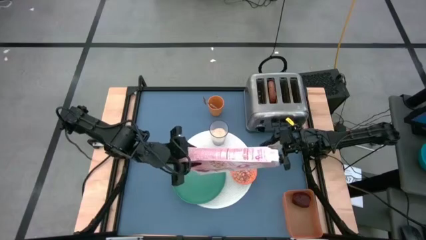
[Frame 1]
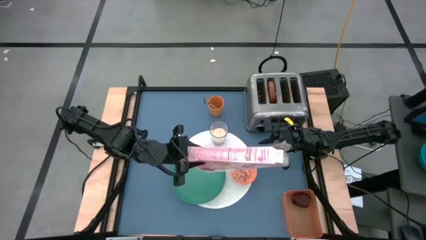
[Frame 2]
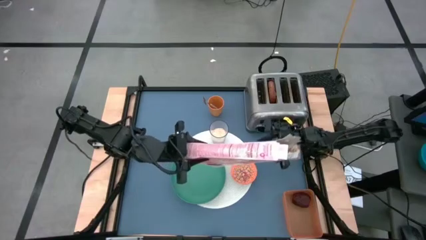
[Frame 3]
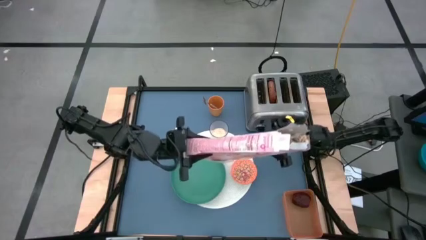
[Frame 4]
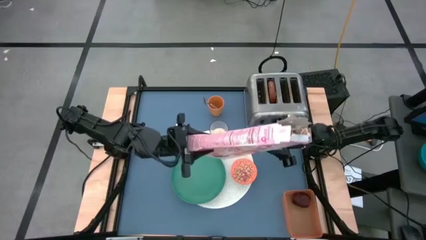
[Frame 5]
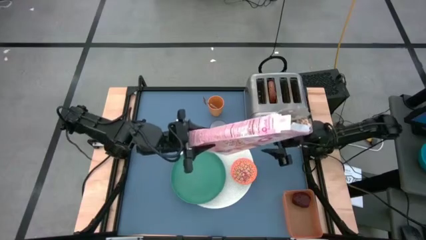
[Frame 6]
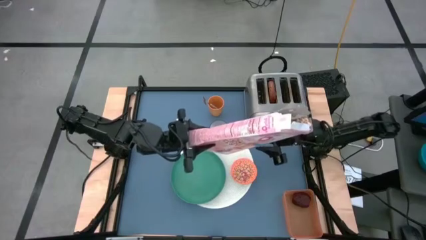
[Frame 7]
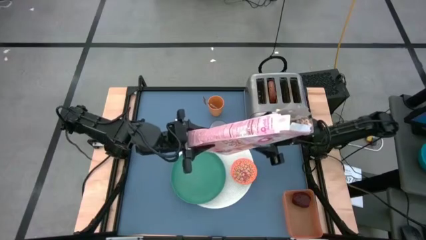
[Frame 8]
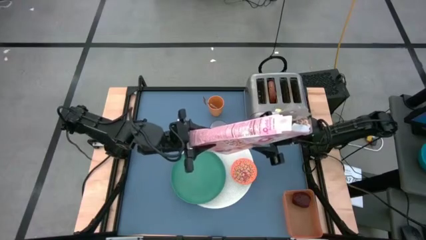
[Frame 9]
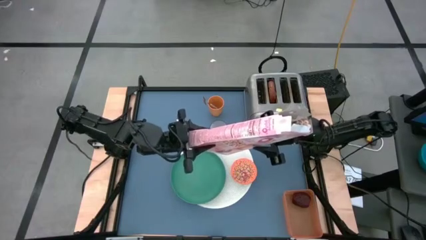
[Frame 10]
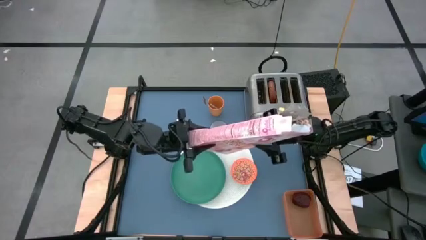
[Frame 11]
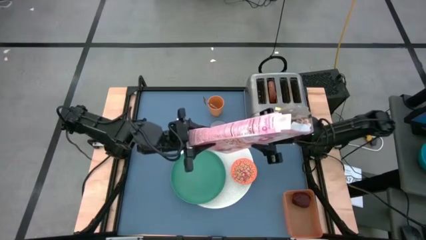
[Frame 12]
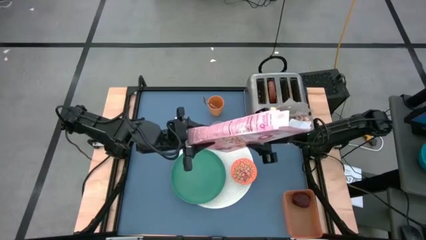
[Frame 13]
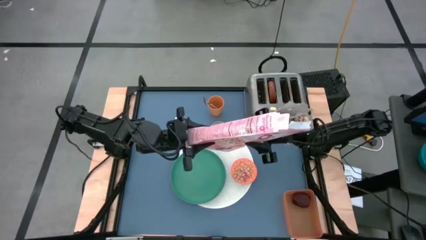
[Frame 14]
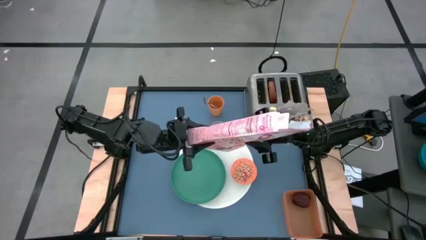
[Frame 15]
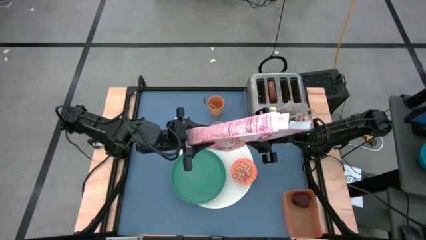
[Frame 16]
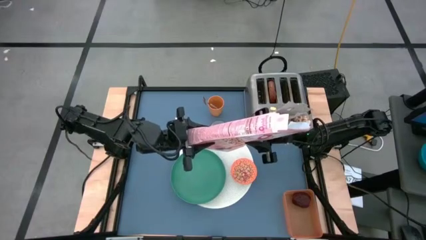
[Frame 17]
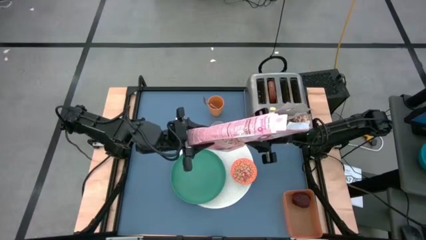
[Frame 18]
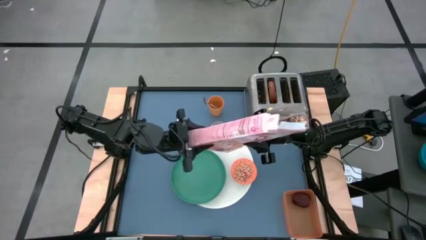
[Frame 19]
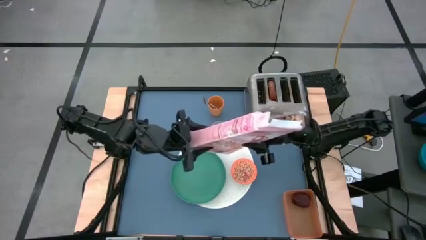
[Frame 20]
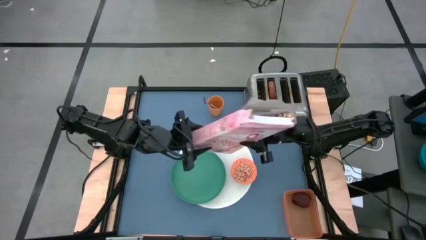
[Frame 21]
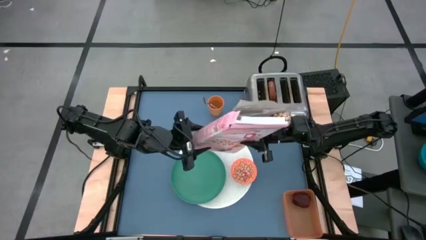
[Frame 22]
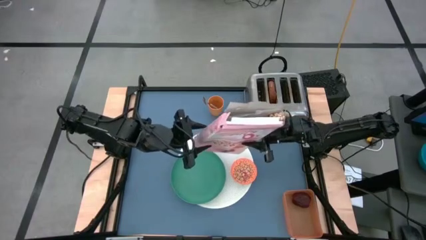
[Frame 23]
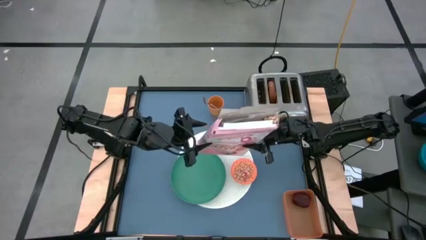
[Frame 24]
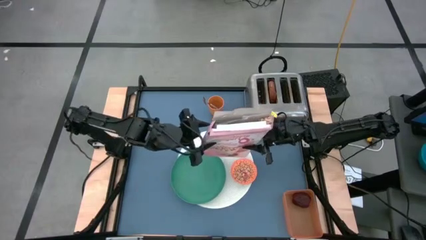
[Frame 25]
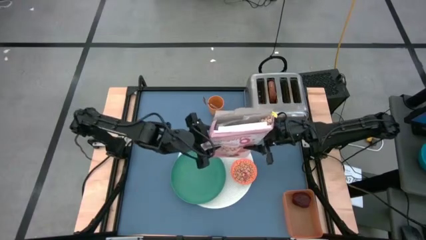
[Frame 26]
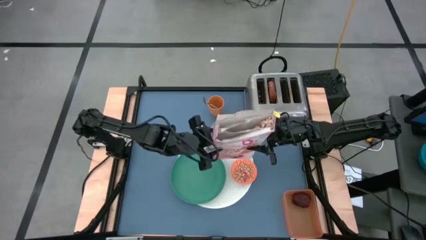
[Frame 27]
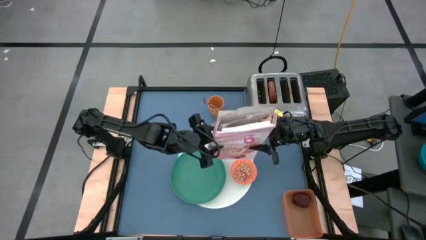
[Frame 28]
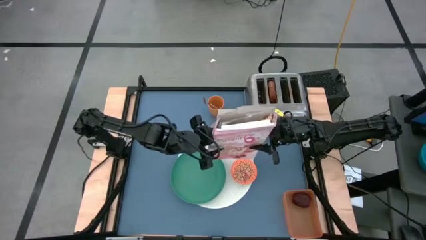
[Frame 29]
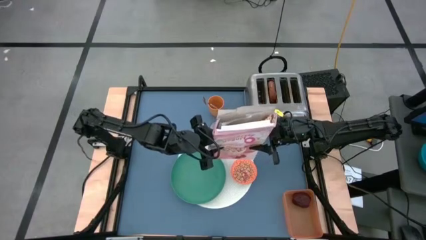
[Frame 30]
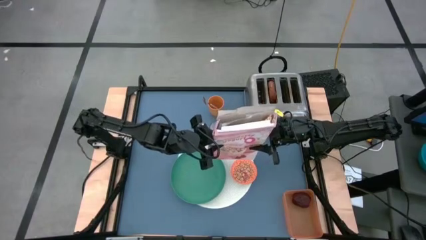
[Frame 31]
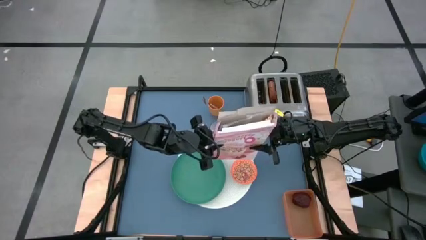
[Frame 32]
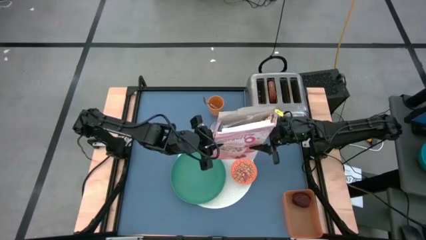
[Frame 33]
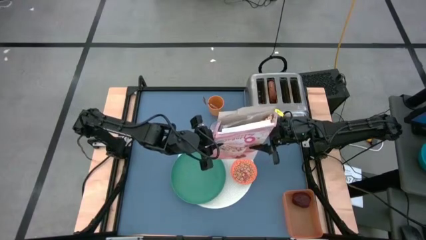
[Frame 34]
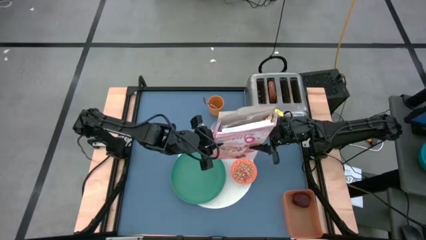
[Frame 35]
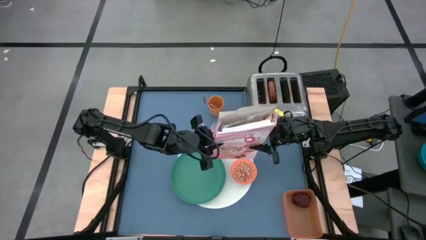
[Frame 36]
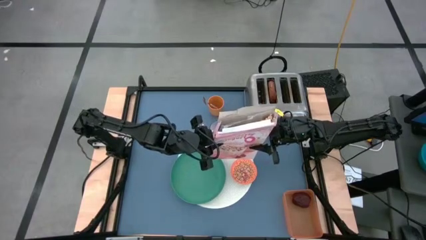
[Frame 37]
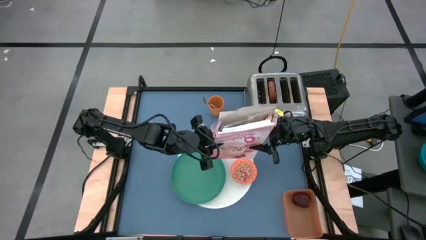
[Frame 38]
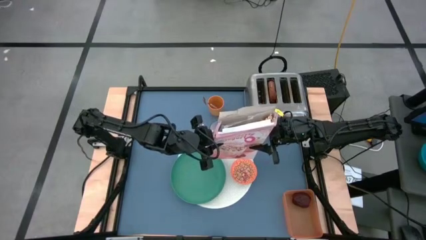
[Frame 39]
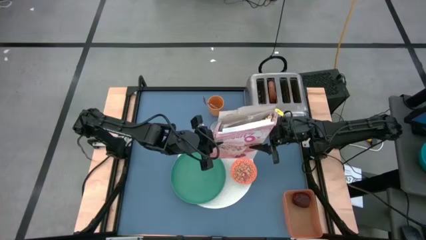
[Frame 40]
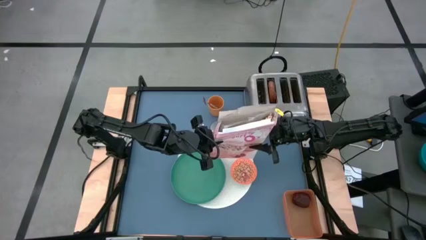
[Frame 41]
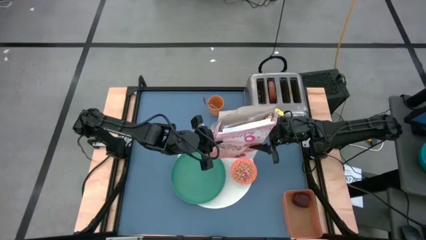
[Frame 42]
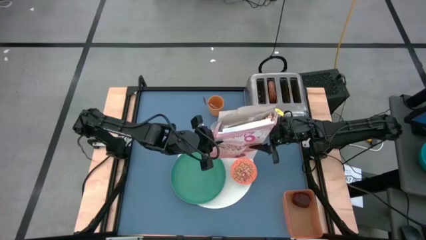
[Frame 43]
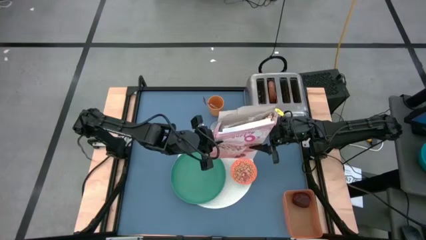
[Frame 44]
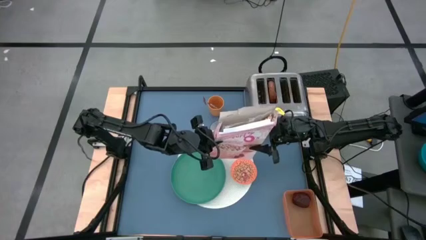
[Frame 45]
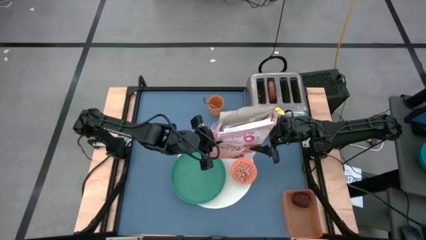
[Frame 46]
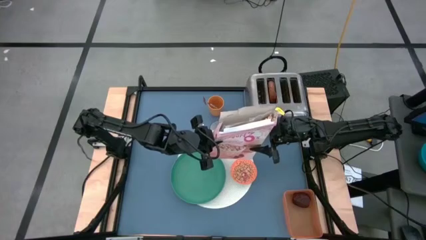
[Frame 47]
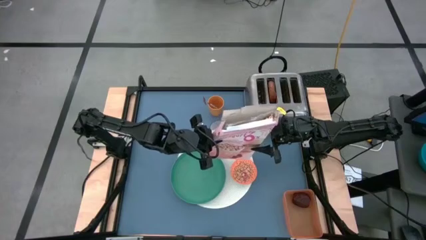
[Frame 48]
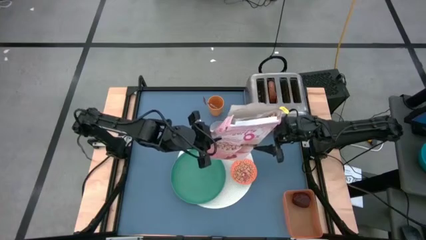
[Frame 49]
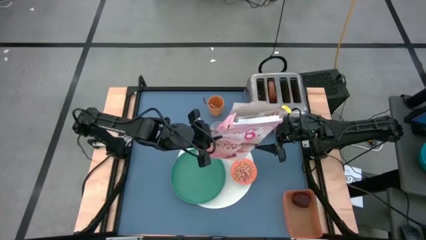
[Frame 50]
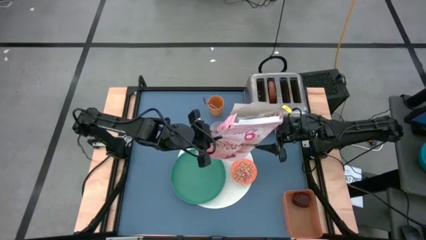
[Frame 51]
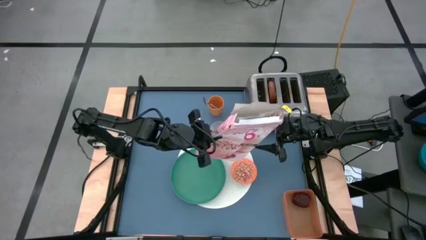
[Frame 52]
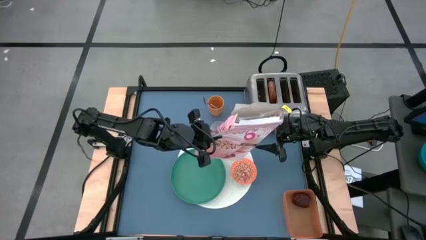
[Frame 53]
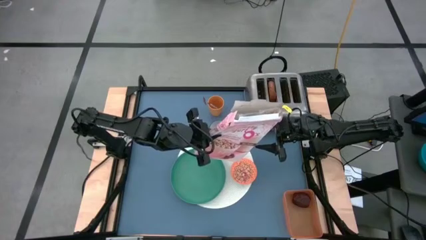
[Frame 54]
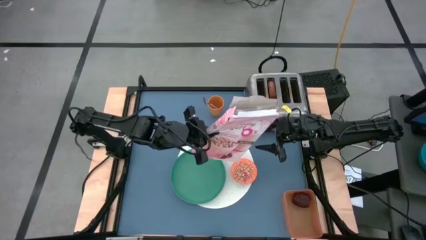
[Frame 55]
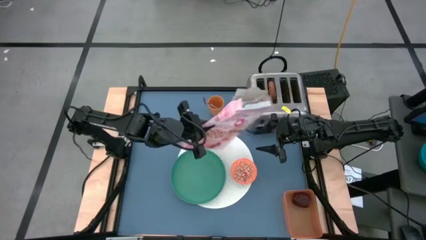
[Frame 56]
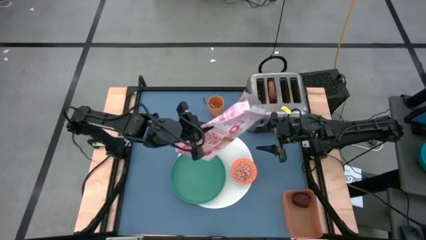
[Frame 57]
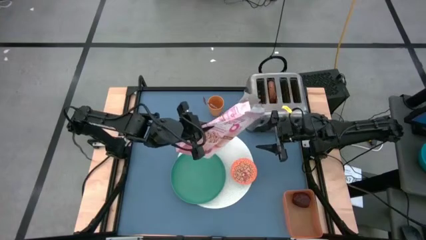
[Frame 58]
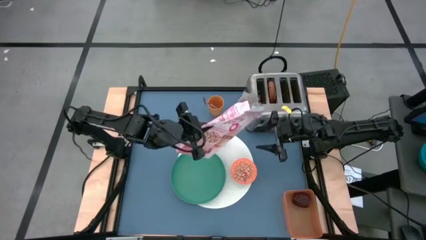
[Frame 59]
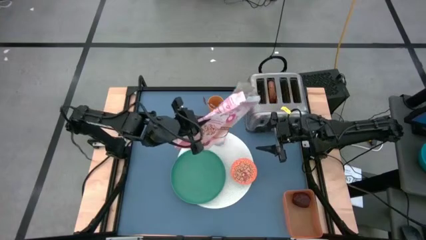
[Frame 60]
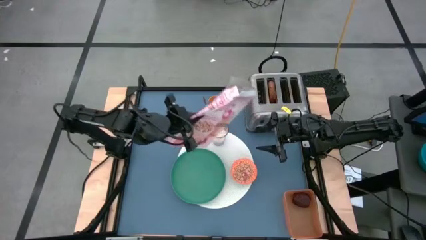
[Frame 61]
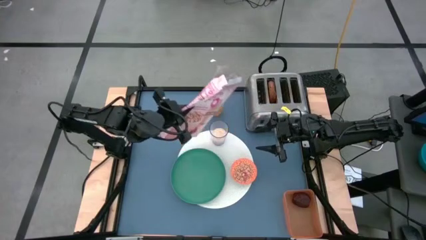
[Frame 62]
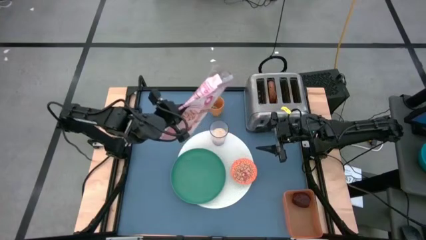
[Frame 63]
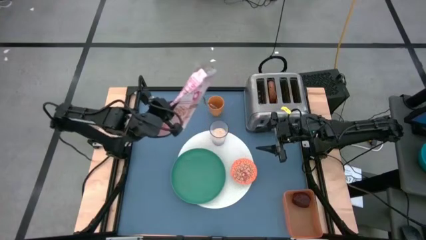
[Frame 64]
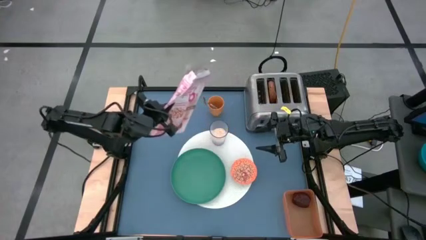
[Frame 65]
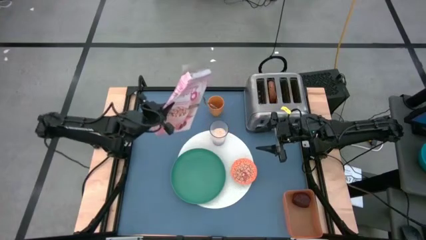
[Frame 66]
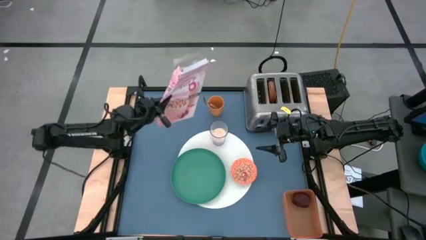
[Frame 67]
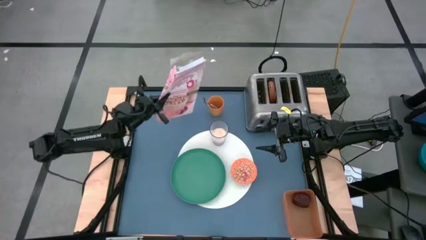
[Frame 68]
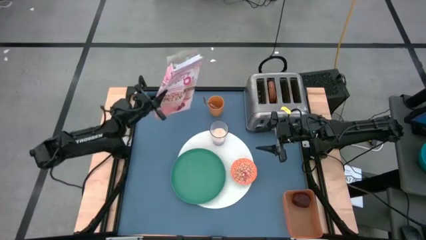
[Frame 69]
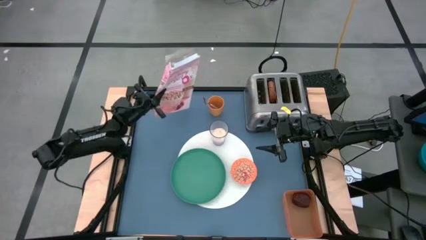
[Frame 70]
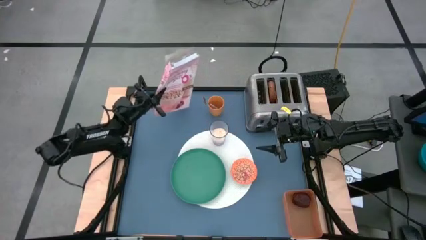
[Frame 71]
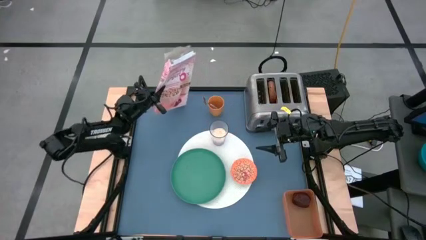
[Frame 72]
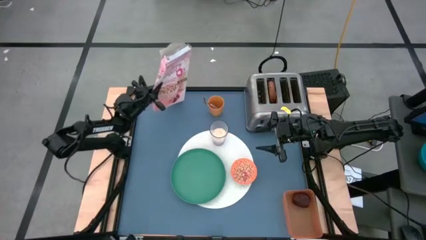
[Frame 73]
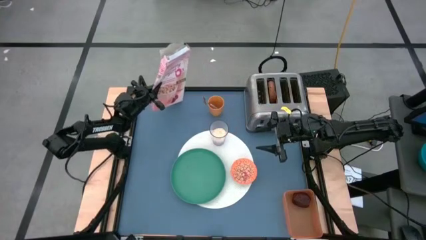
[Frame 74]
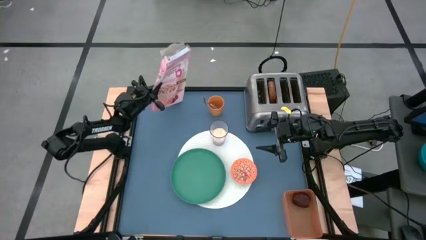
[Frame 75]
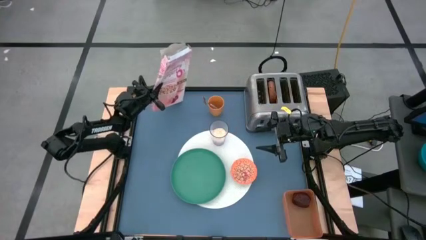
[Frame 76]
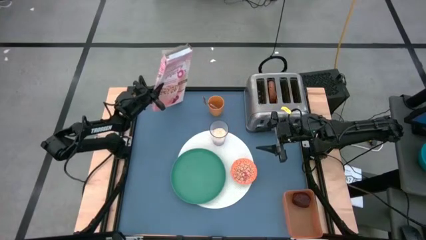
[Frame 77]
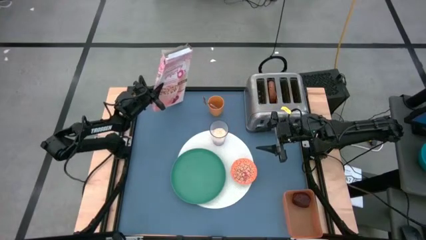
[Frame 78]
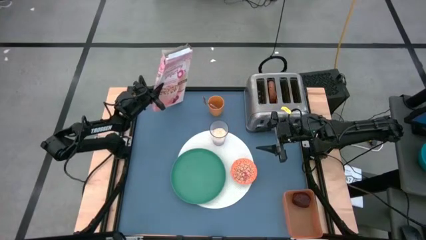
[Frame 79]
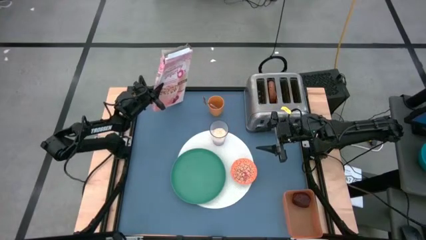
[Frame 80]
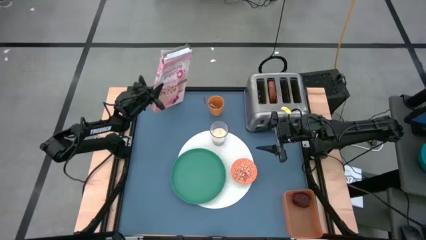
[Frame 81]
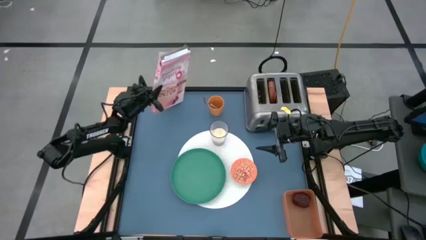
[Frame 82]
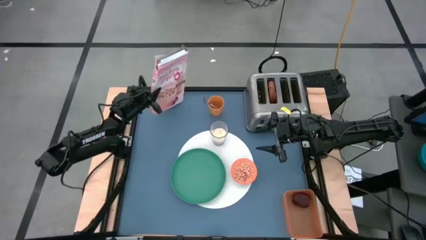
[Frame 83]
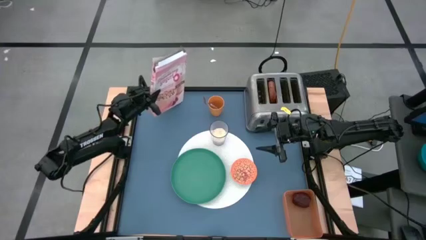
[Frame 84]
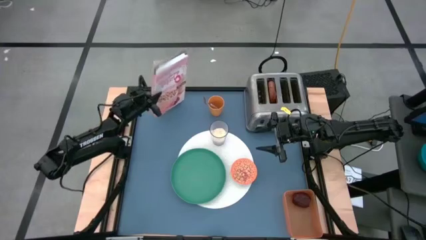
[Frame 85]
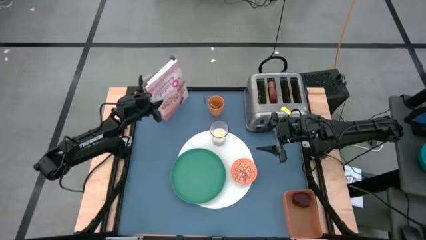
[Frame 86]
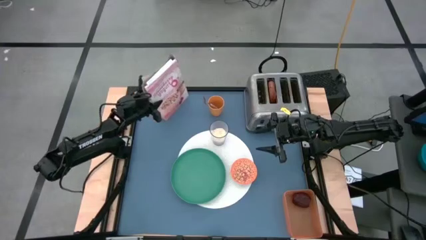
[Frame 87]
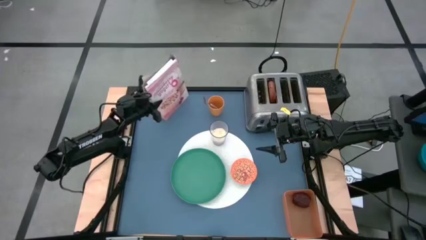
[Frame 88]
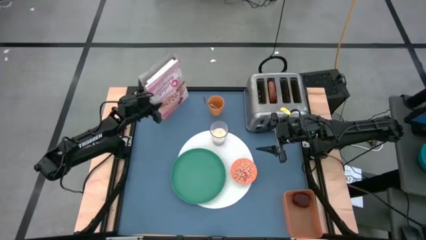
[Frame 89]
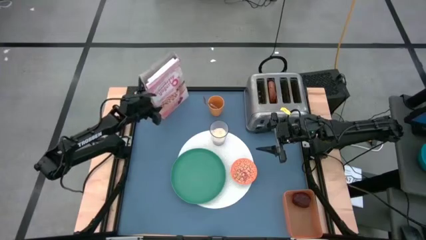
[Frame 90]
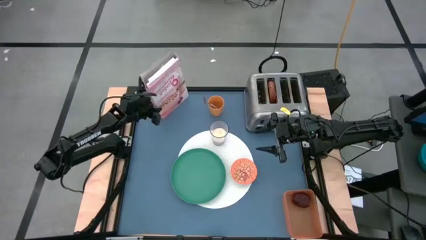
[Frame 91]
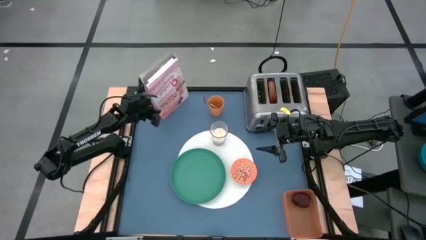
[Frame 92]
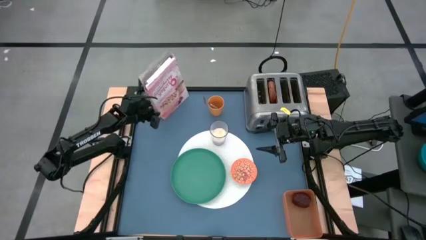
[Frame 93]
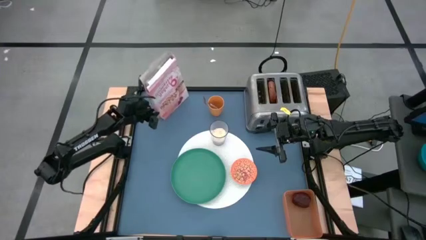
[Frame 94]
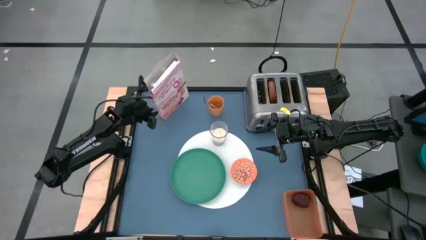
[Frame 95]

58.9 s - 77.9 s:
Task: Arrange a breakfast setting
Pour the cereal from the cereal box into the orange bowl
